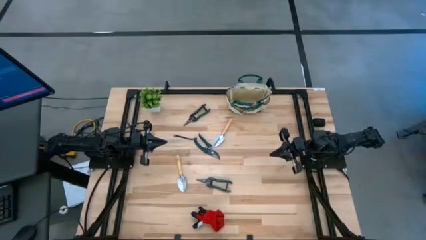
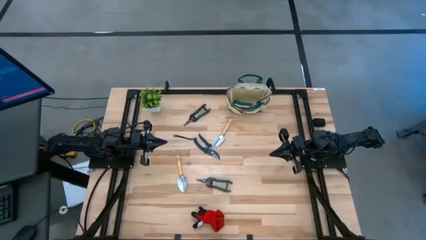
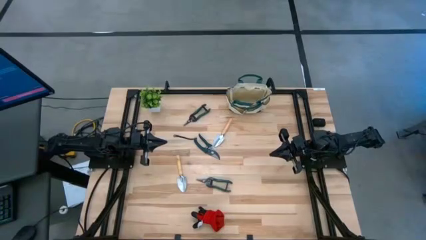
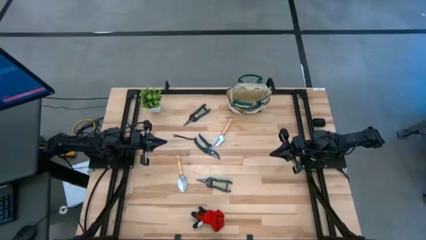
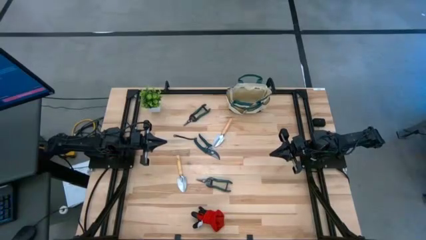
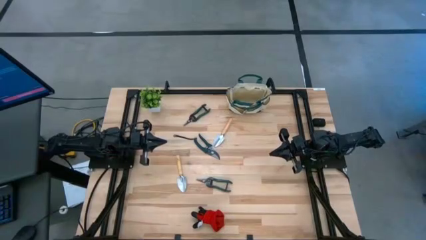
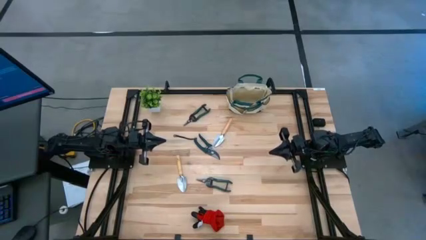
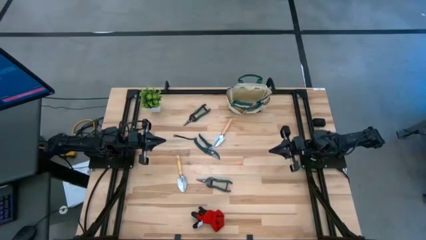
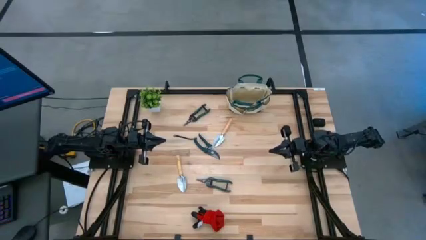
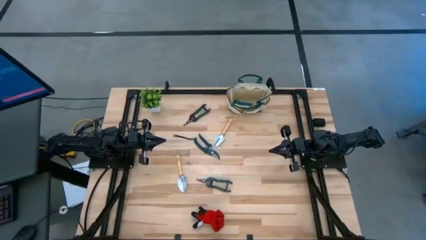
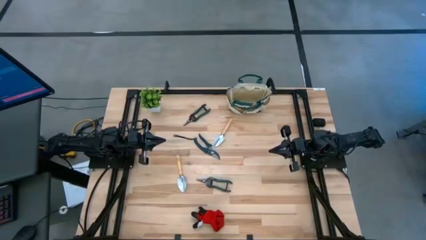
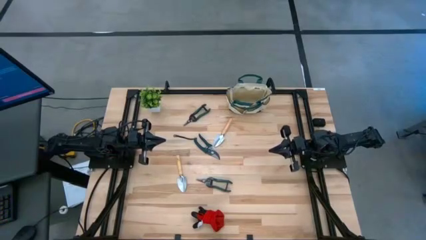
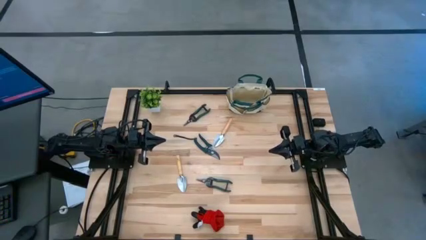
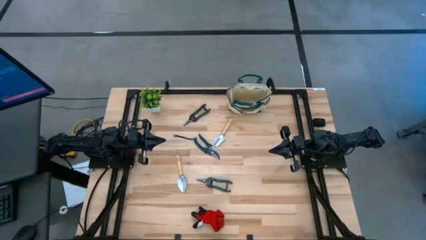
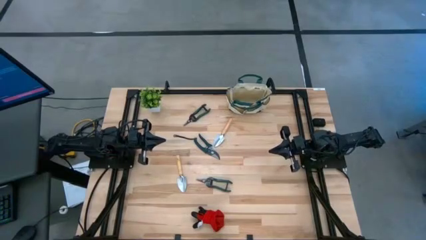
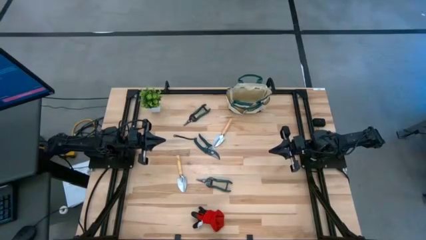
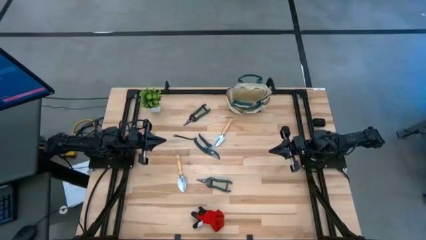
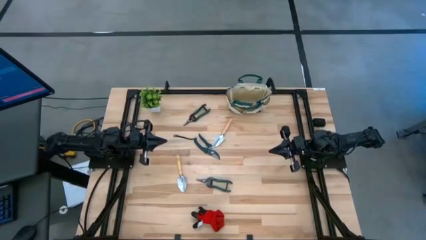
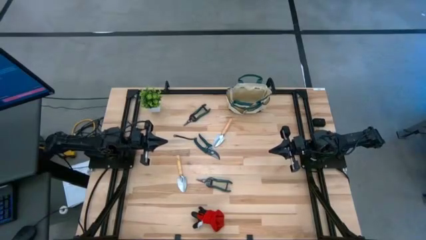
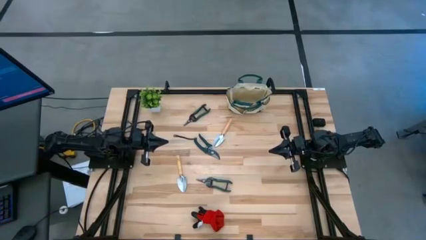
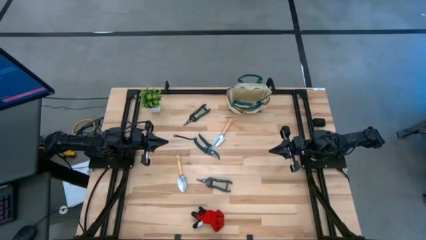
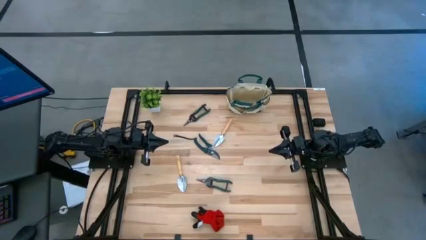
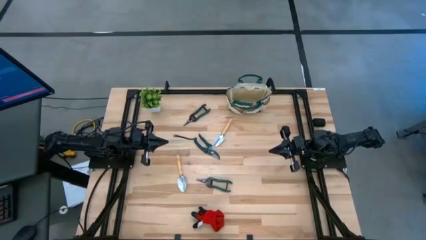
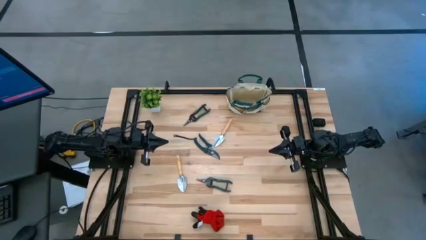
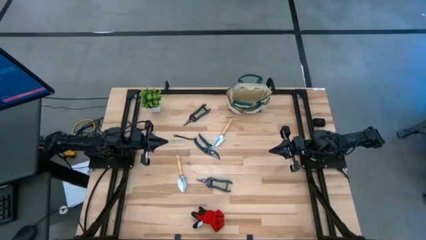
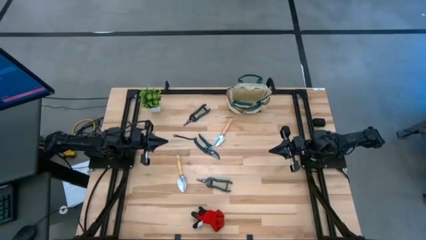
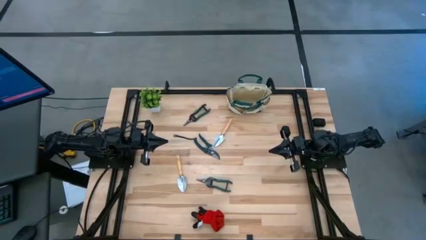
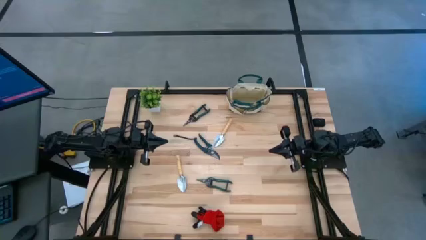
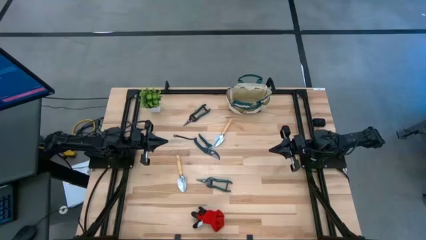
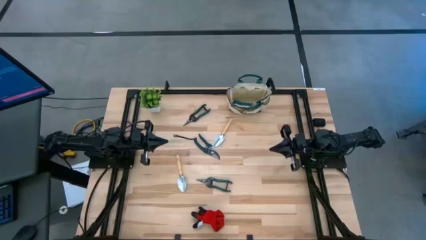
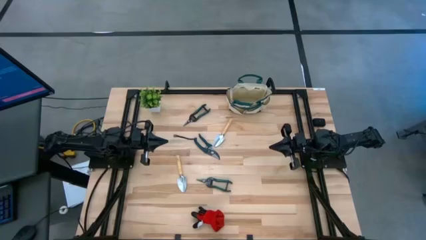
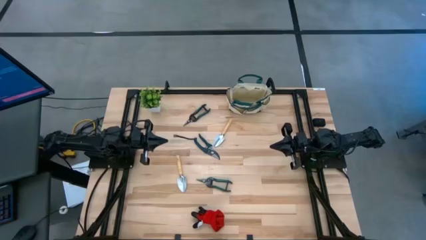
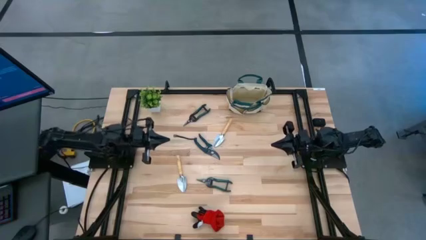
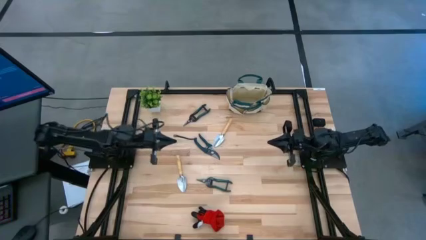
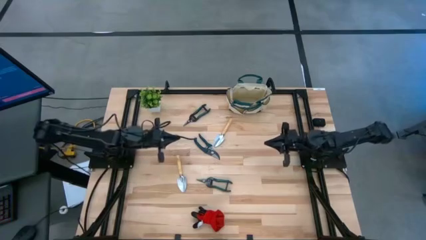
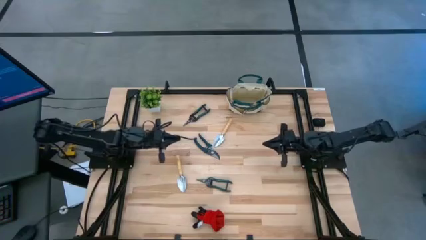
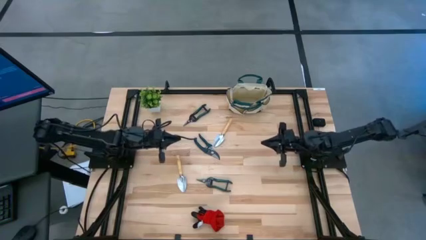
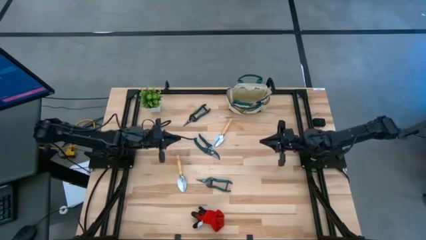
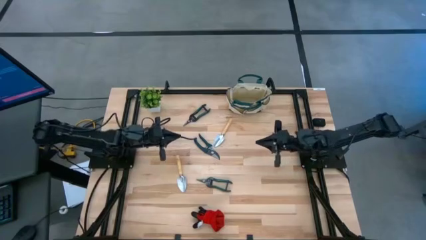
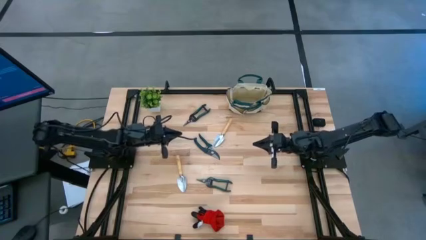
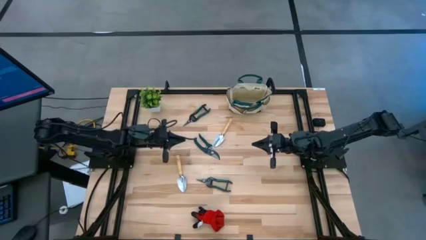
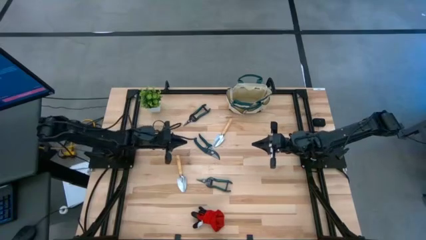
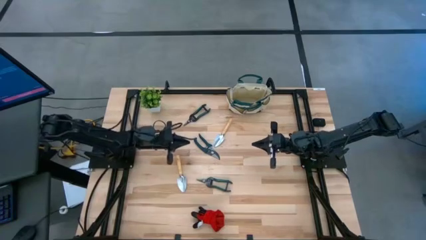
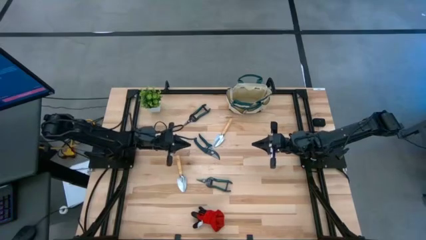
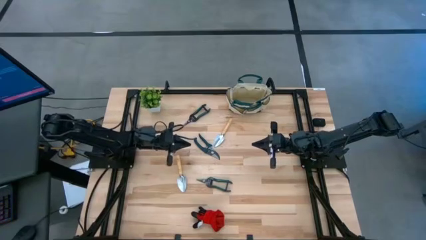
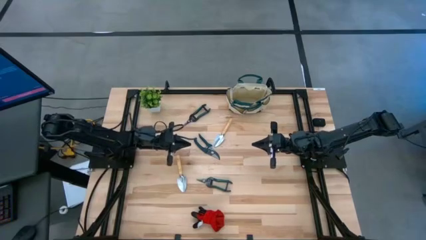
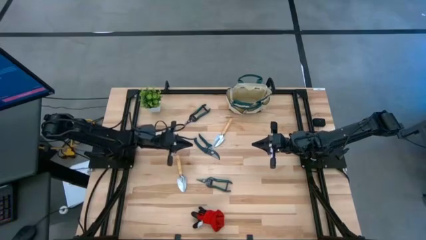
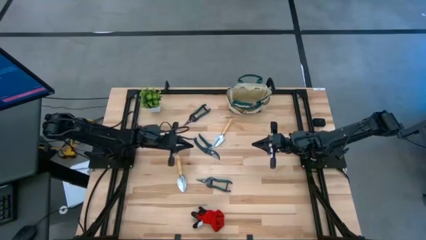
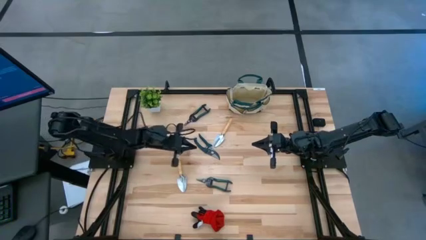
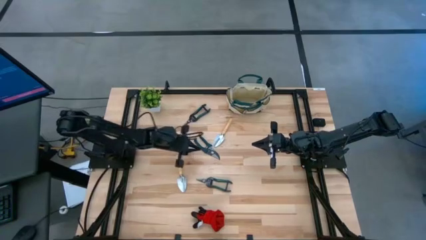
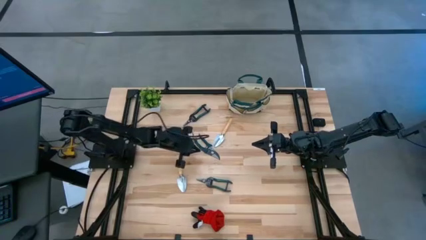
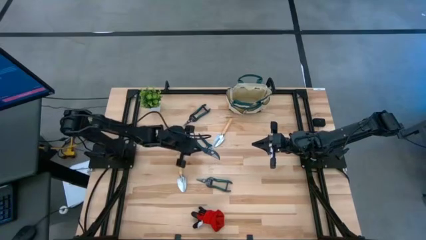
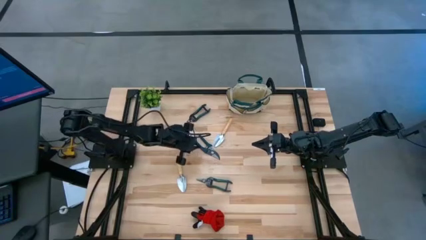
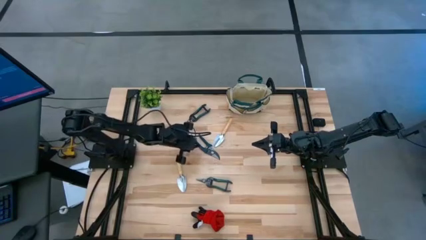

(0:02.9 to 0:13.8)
Task: Pick & Place Garden tools in Gardening bag
Put the middle green shears into the gardening bag

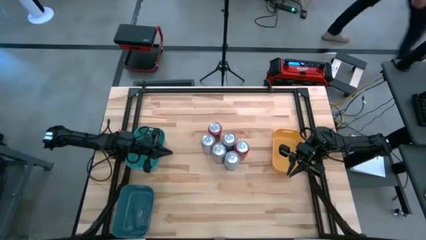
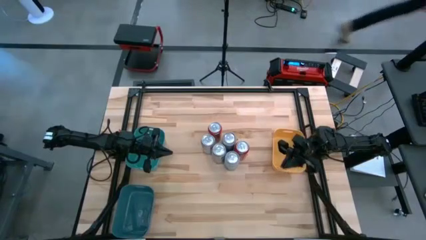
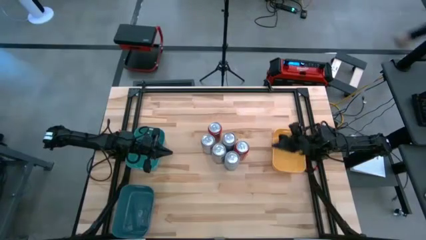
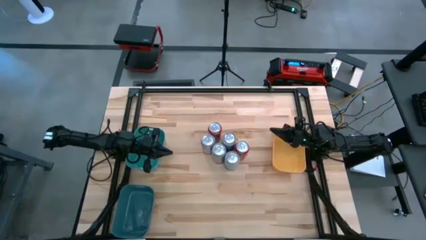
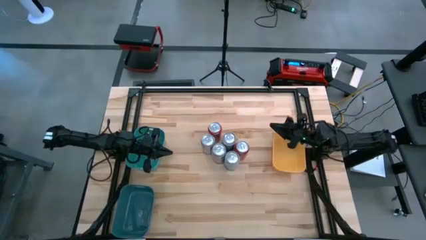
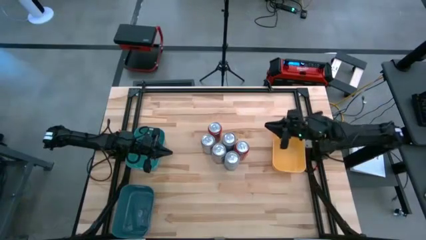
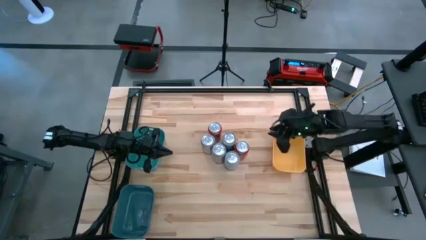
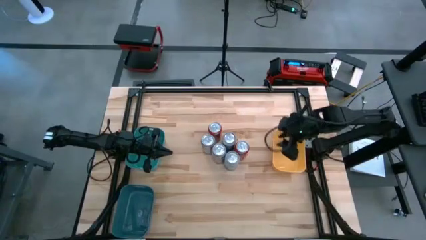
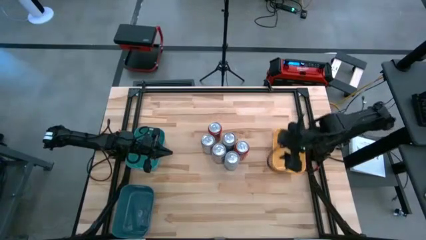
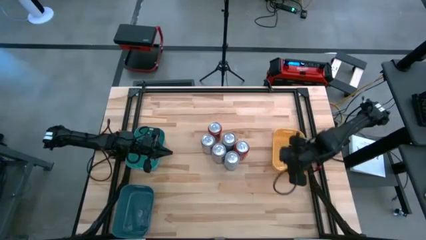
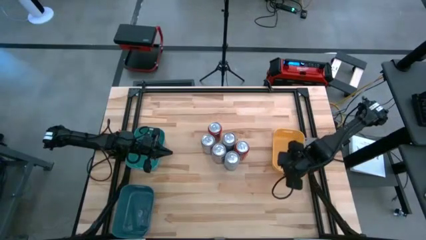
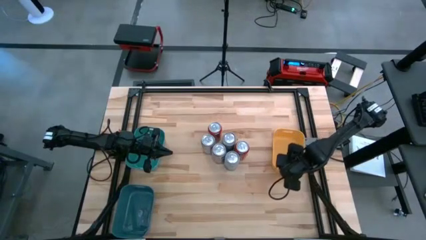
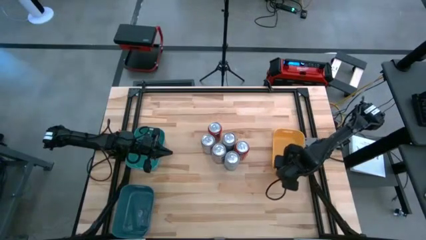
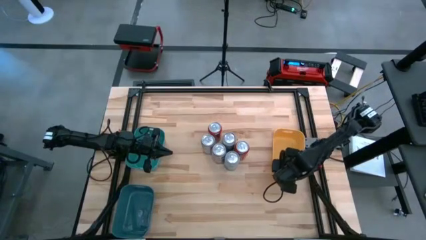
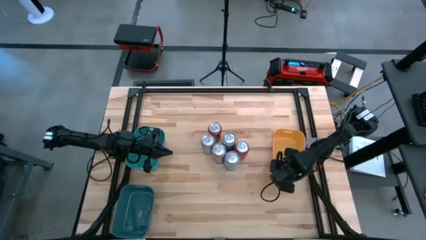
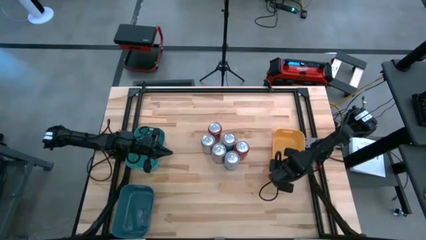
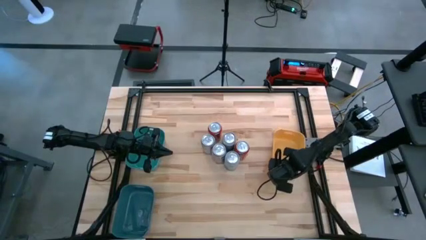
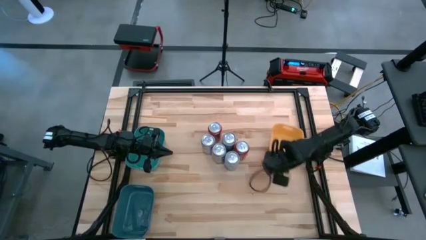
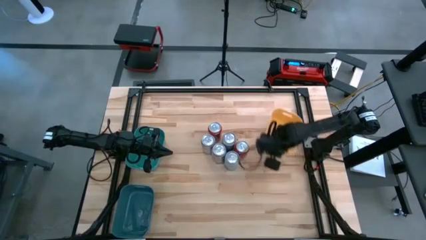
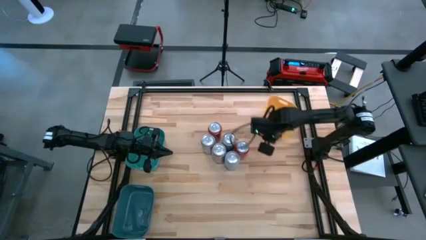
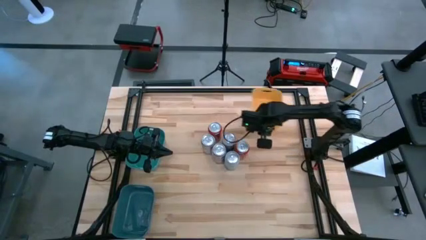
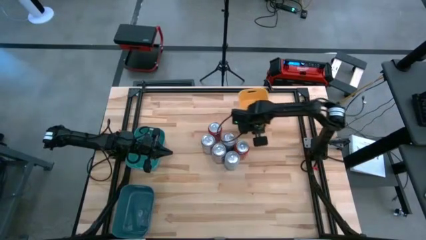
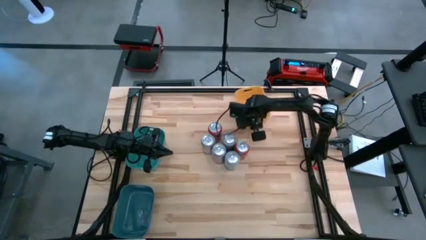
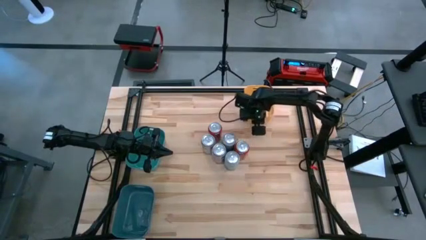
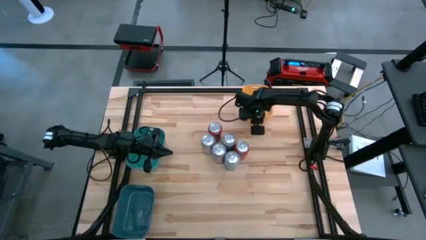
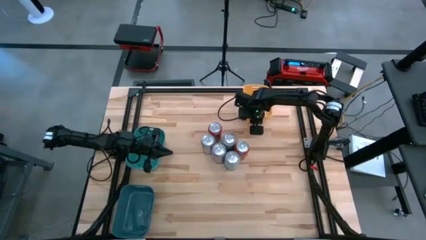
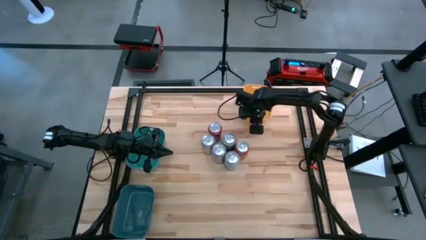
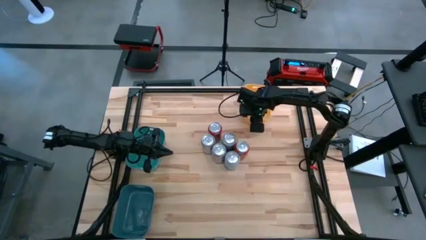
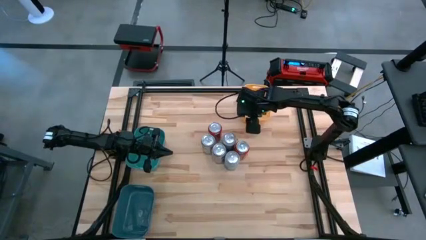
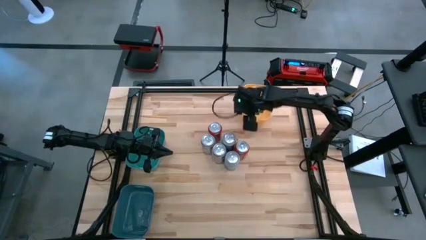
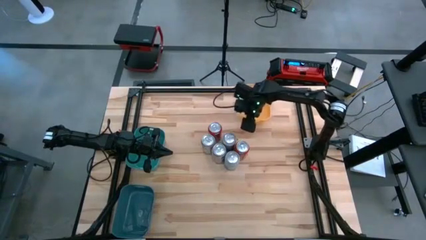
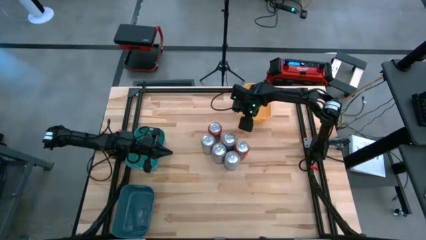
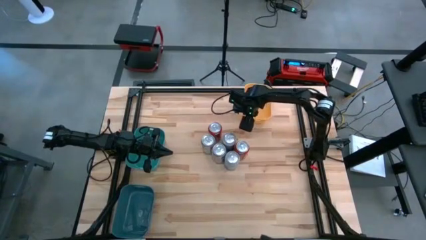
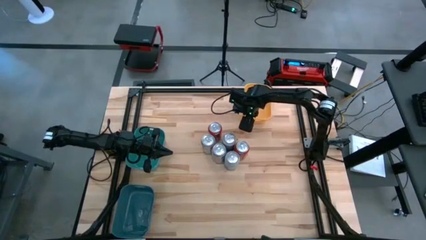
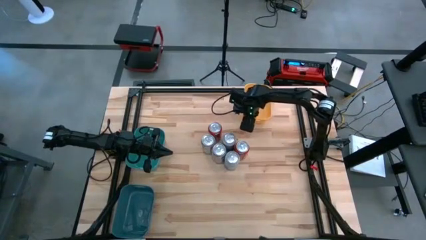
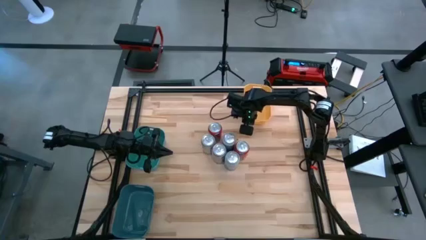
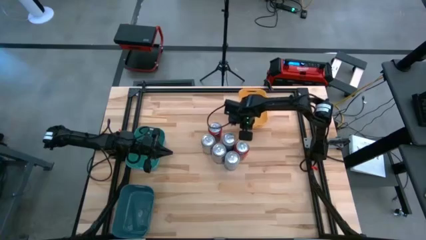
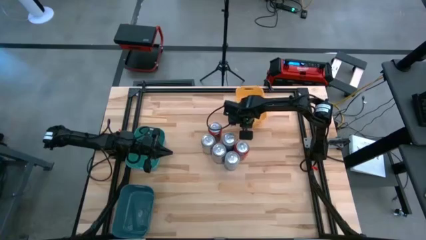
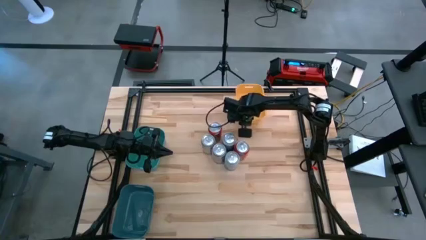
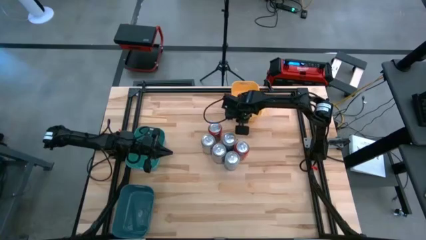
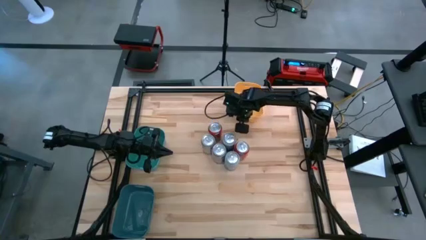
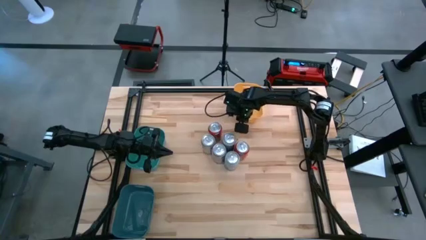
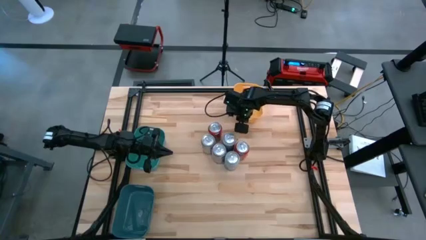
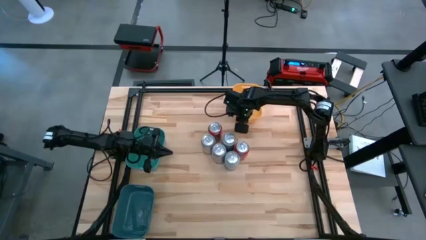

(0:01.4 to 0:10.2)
Task: Sort soda cans
Move the yellow bin to the top right of the table
